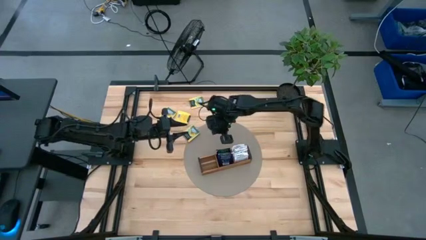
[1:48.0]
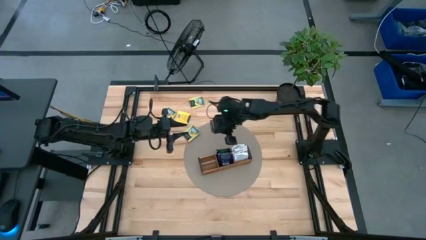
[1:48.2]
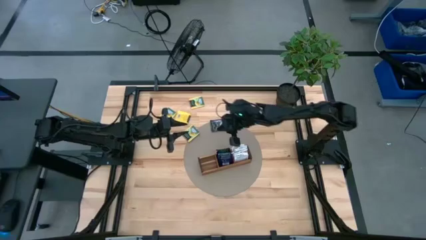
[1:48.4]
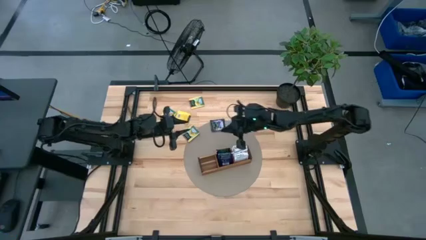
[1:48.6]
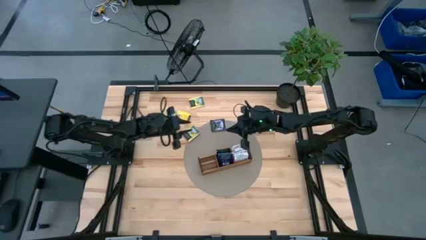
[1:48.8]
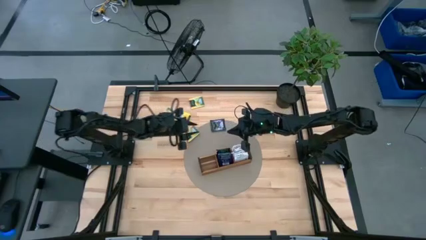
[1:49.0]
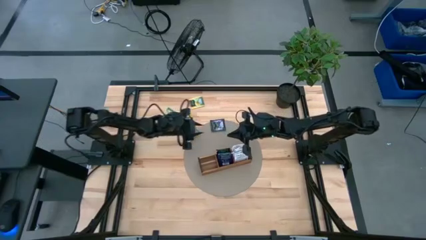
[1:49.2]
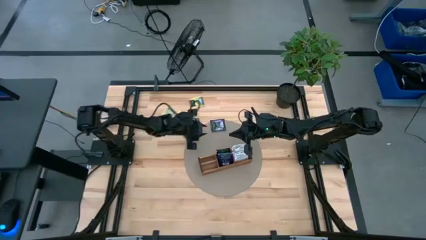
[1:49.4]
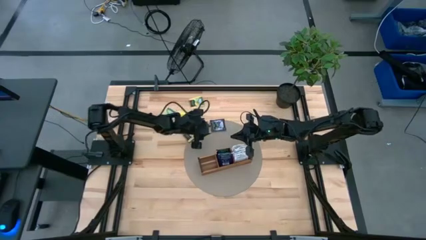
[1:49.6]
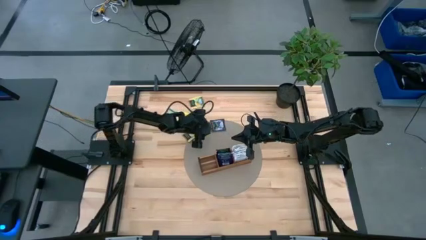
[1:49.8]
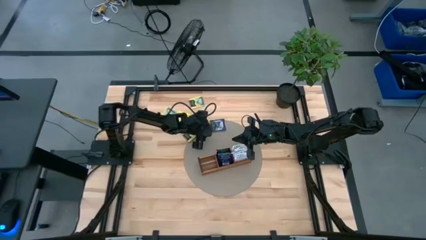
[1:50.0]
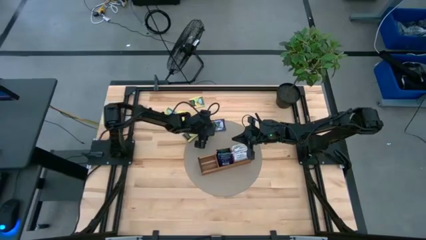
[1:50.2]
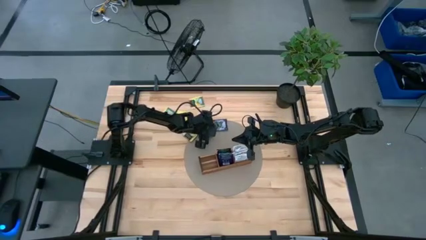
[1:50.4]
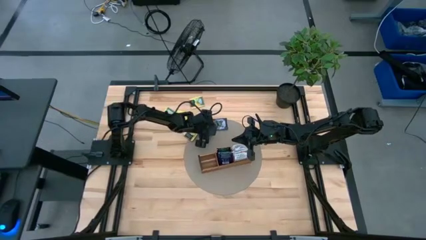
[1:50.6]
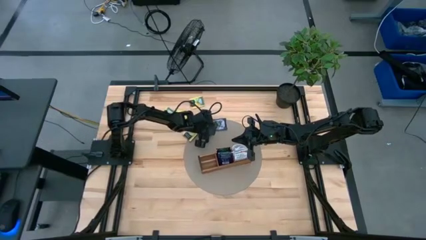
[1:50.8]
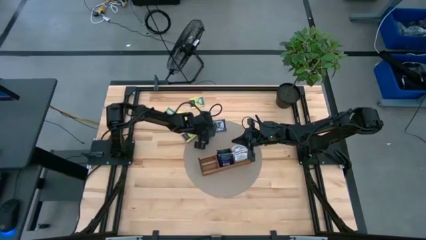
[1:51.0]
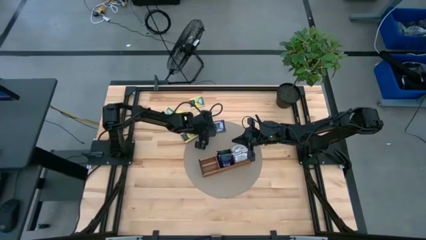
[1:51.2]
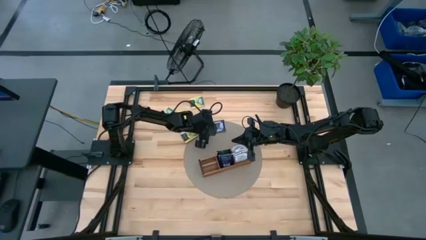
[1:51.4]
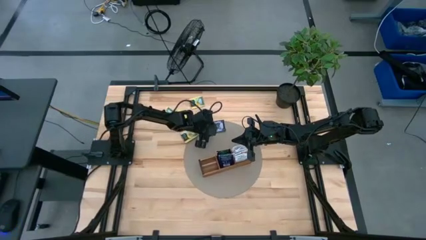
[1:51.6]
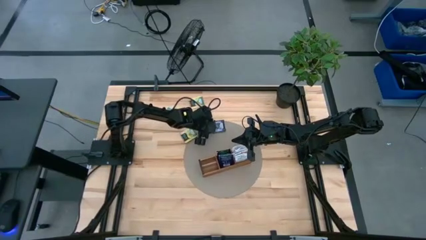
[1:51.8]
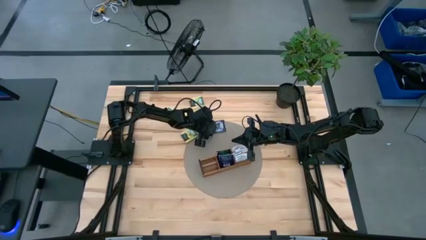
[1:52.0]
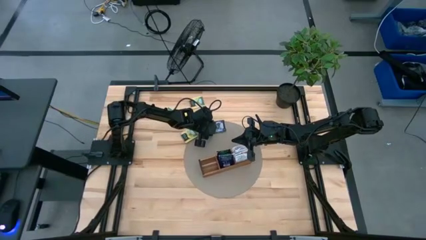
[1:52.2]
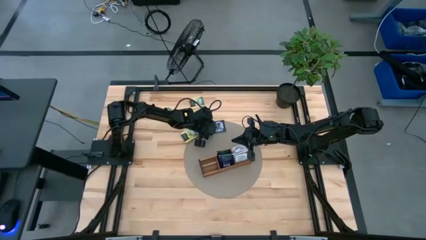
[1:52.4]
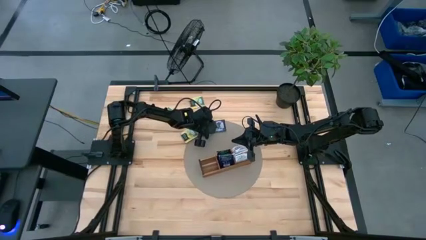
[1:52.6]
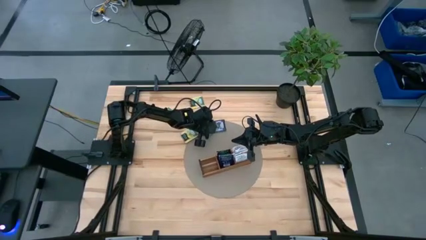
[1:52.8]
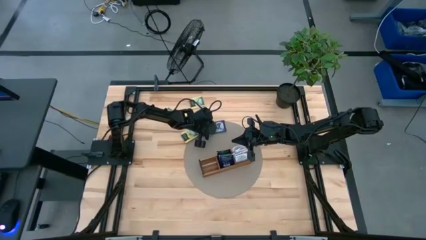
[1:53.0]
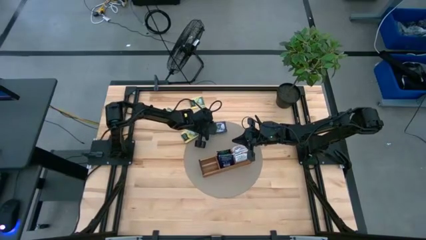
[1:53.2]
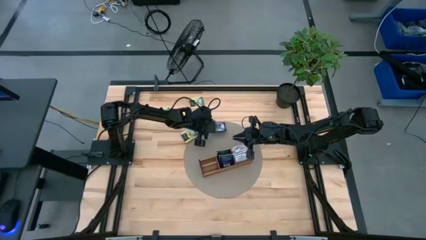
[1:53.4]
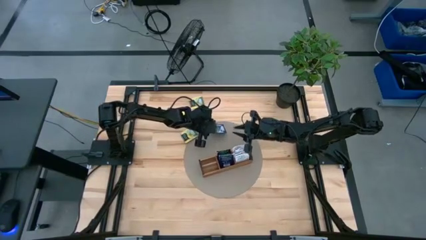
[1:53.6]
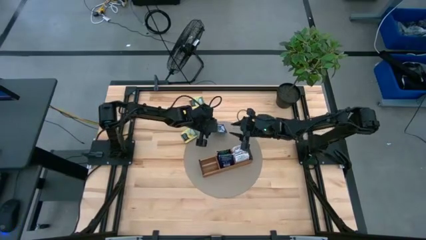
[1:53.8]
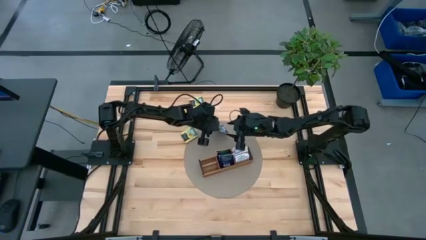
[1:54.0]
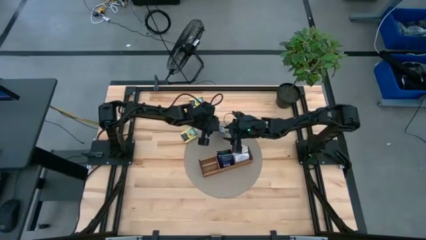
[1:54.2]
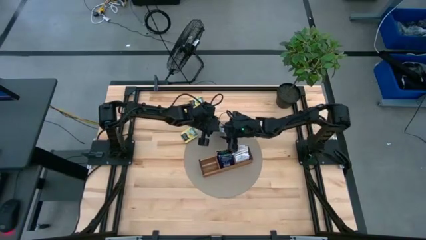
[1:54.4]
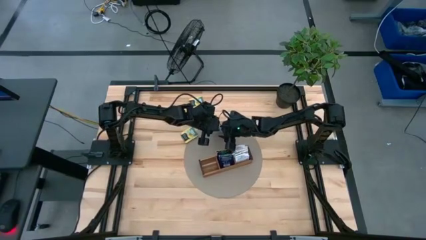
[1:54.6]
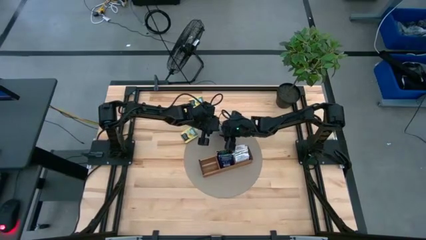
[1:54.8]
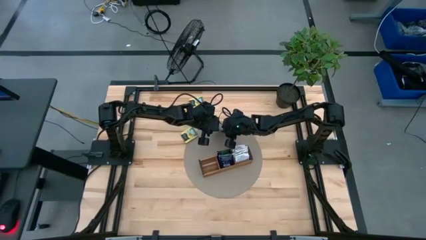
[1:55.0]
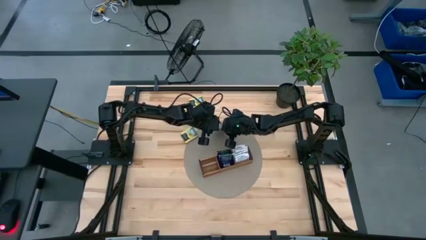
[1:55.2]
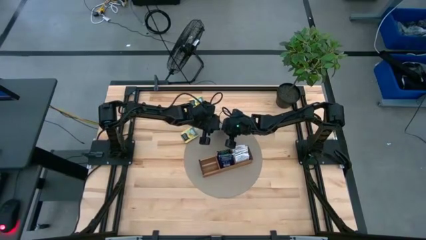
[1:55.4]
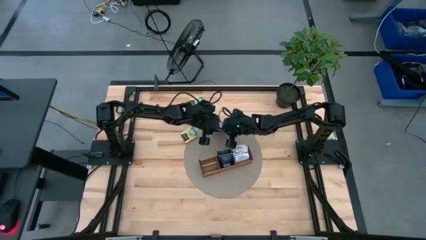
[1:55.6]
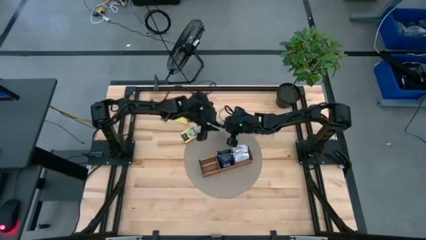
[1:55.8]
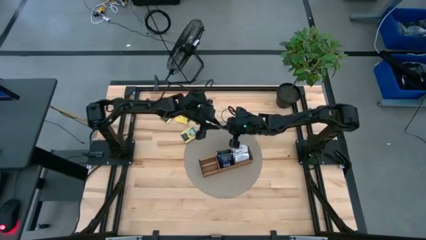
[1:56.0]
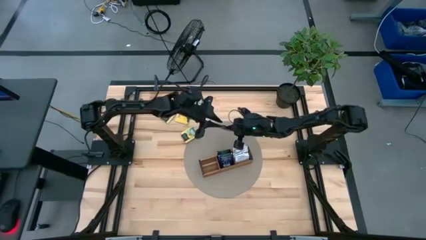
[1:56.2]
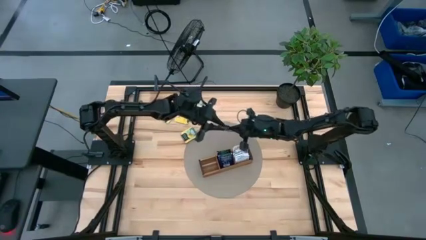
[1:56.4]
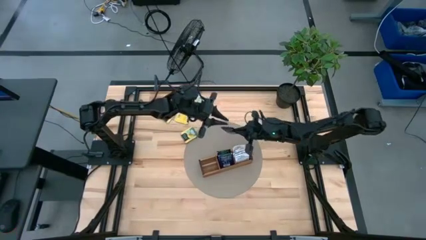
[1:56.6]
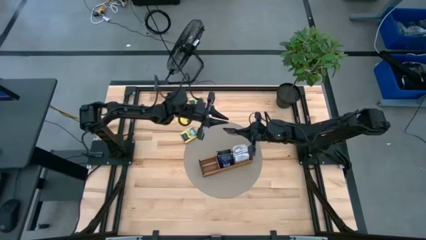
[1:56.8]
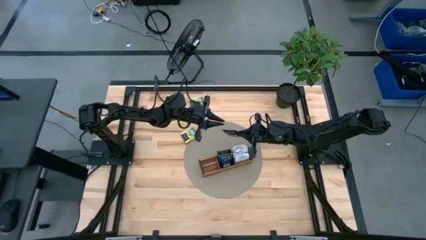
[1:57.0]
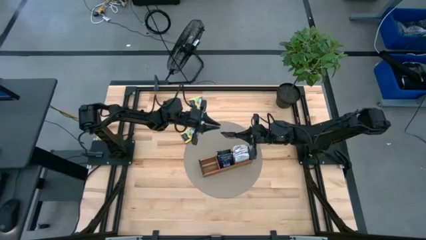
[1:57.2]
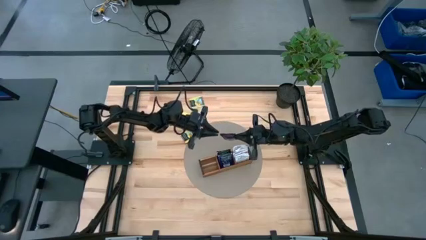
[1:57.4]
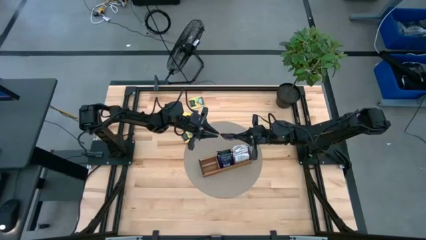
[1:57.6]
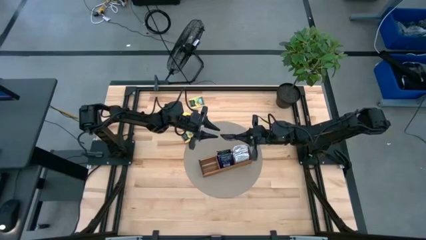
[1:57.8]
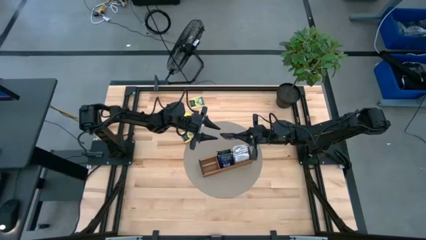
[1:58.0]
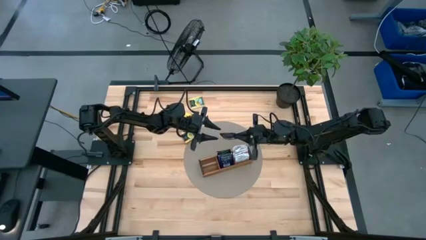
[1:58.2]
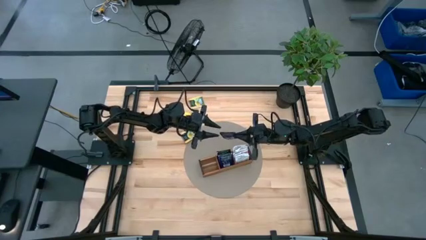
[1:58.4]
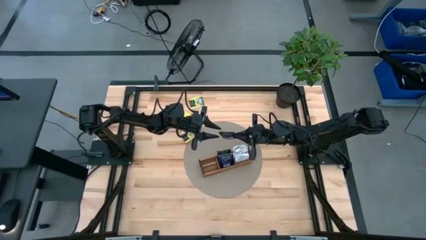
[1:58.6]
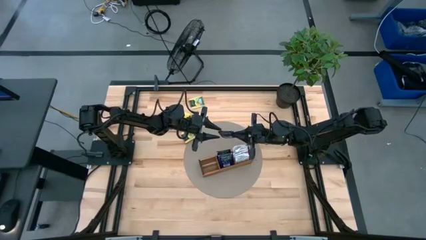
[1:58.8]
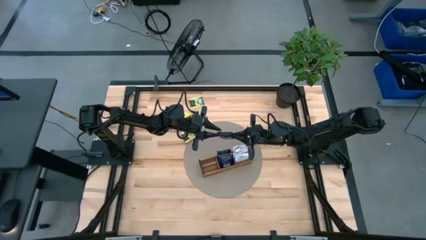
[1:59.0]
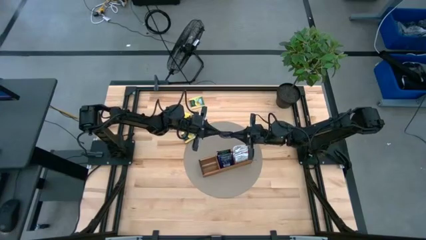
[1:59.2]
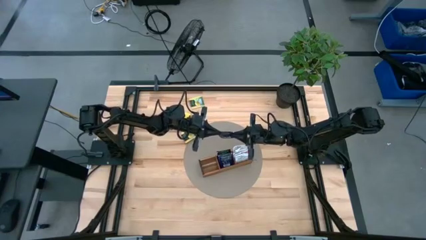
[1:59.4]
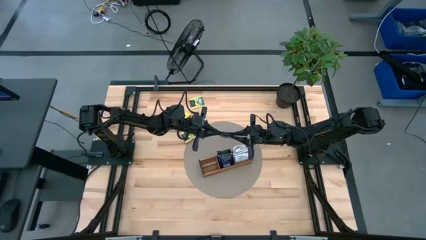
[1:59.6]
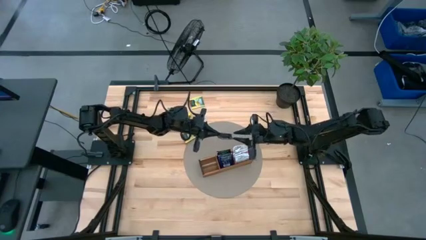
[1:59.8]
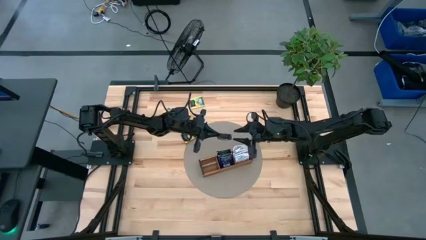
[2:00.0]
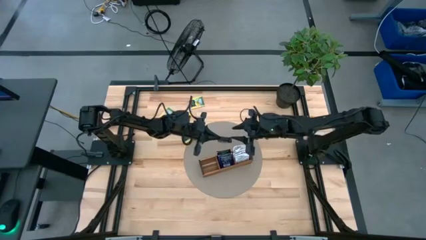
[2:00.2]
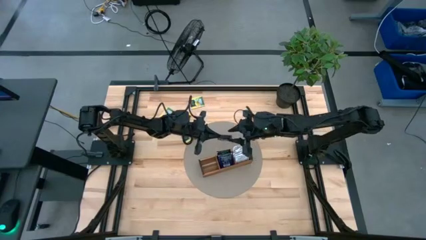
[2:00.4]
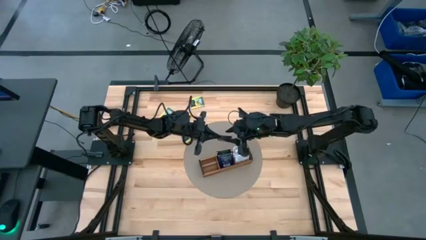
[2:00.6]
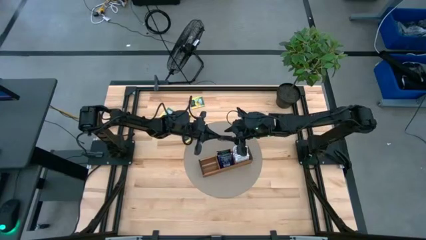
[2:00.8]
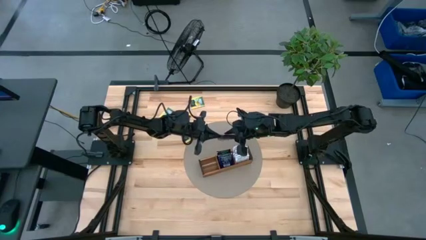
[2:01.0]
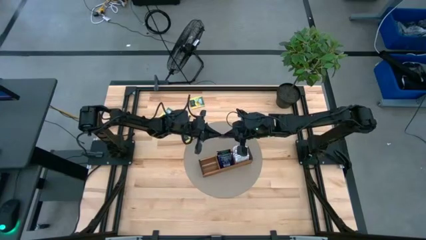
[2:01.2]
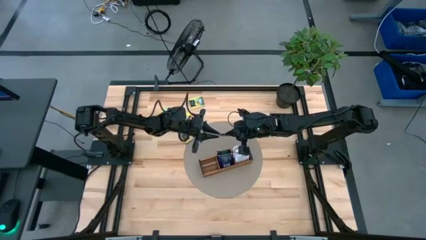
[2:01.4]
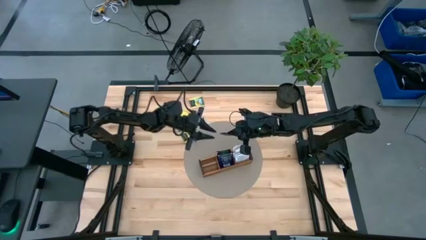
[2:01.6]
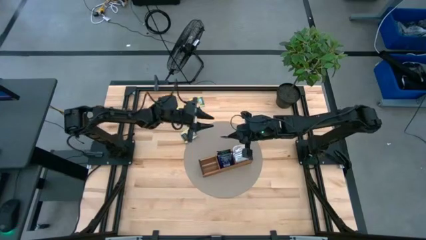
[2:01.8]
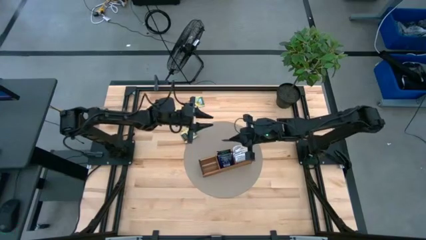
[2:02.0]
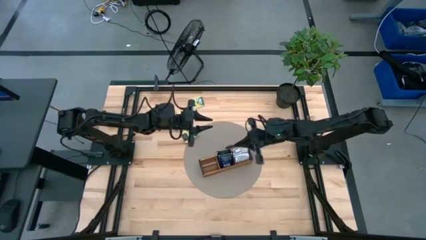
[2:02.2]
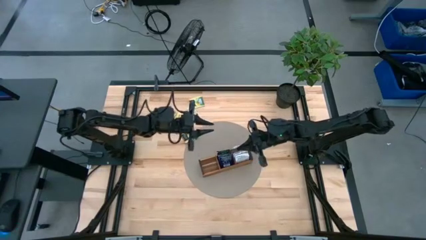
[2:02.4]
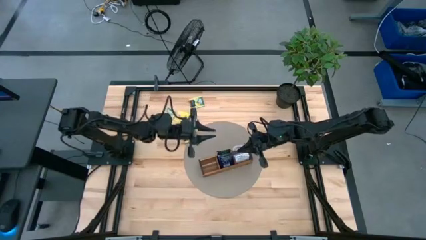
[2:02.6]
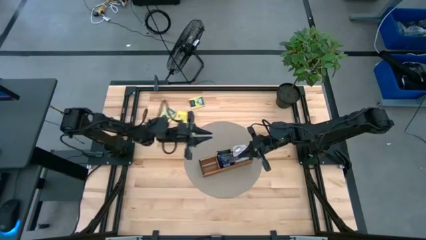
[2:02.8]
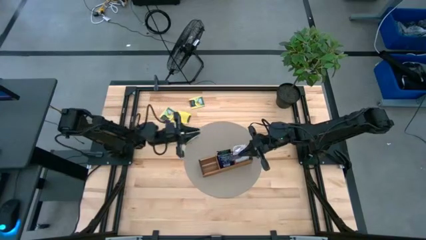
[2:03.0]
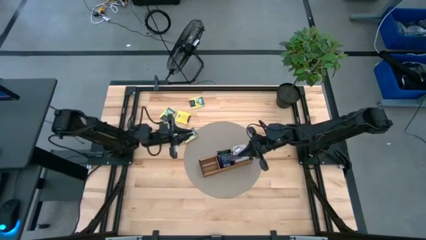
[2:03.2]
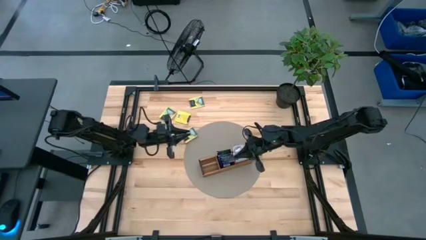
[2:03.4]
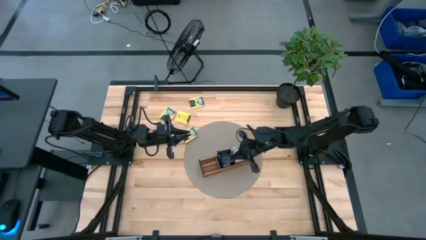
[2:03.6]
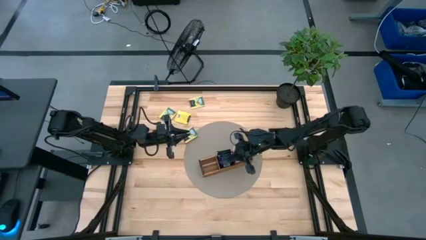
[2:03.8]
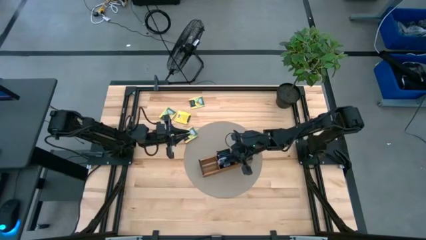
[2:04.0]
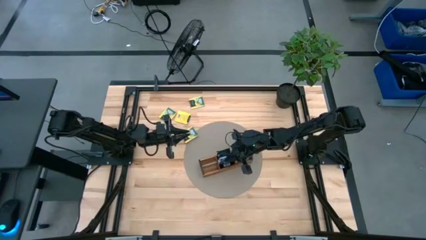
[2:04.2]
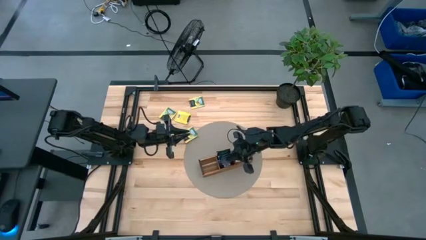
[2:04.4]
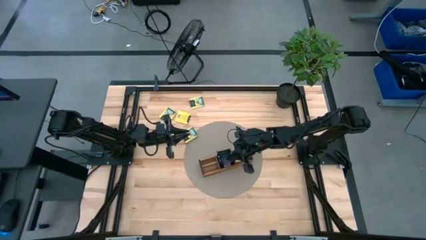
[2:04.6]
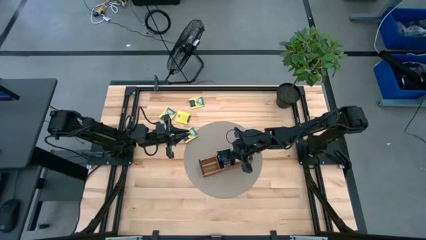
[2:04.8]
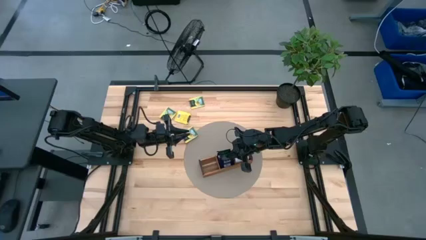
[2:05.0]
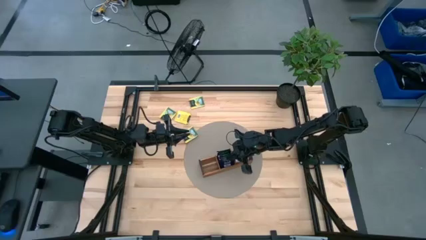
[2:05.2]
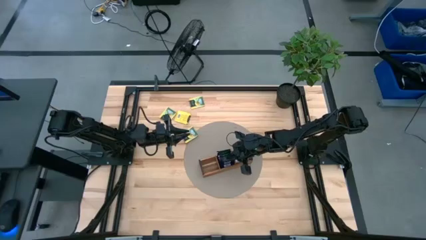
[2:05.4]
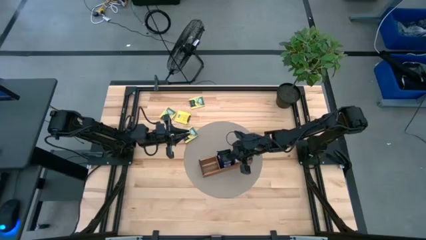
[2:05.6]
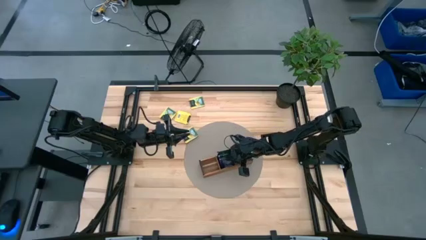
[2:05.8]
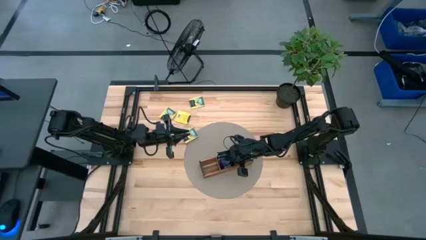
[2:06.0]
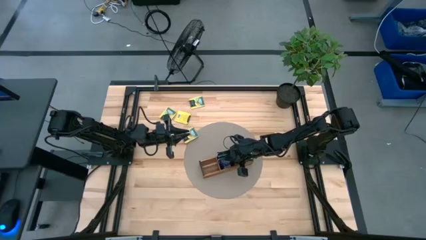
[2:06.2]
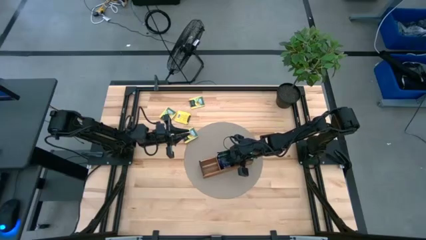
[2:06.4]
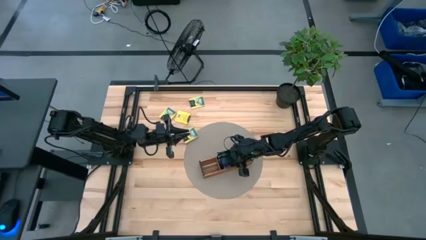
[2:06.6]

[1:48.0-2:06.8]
Task: Pick & Place Tea
Put the purple tea bag into the middle section of the wooden organizer
